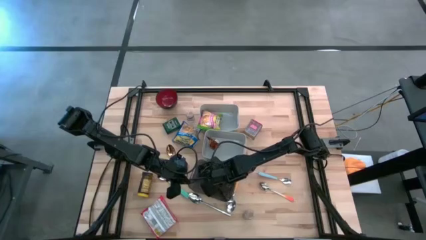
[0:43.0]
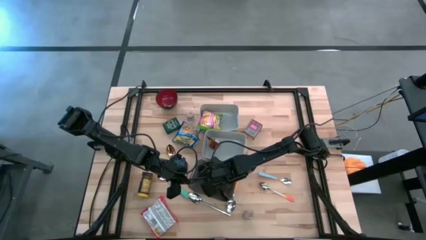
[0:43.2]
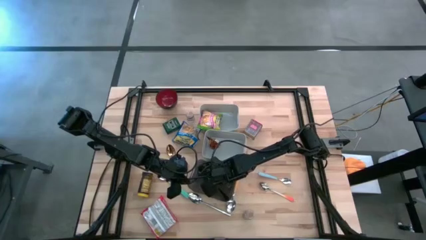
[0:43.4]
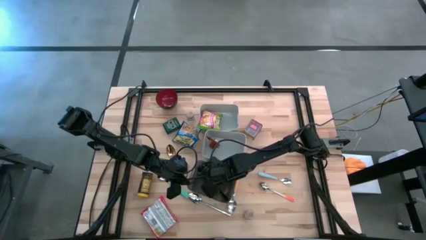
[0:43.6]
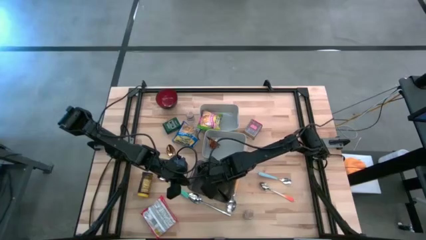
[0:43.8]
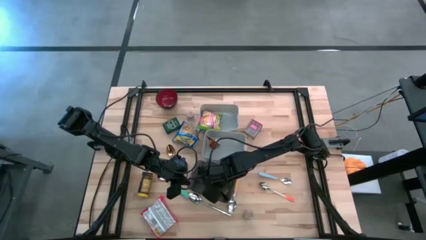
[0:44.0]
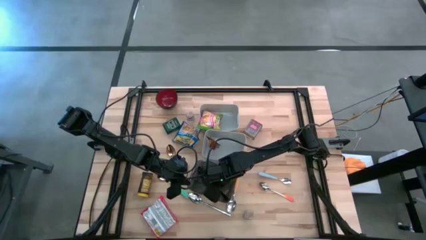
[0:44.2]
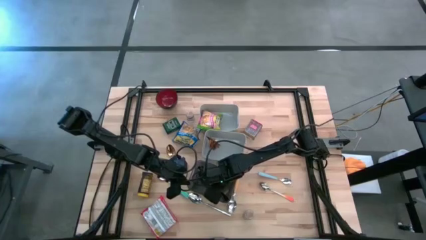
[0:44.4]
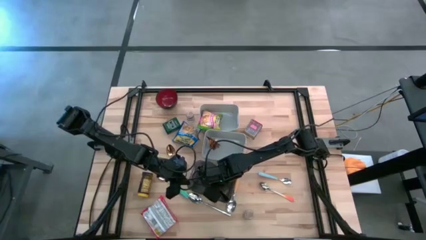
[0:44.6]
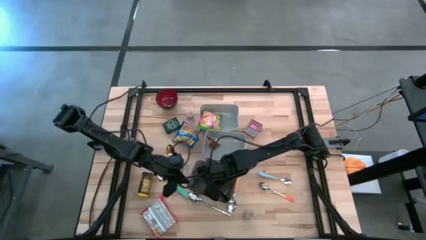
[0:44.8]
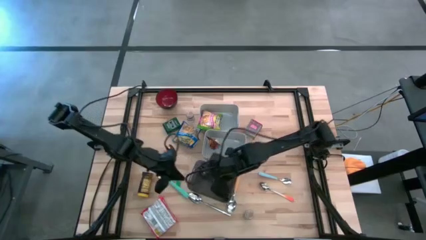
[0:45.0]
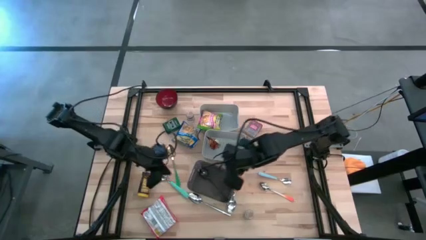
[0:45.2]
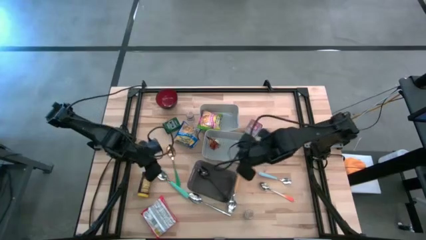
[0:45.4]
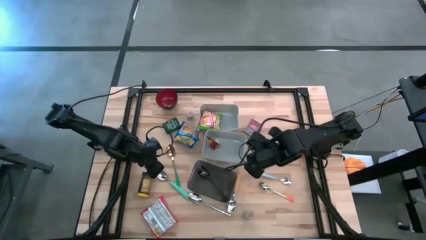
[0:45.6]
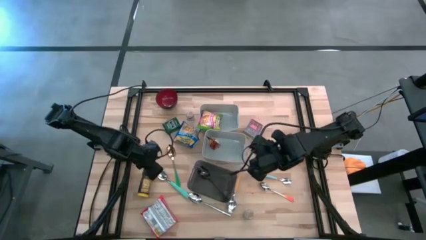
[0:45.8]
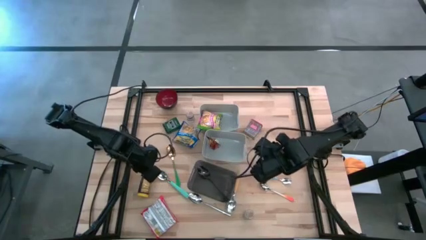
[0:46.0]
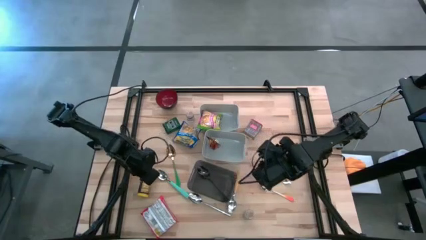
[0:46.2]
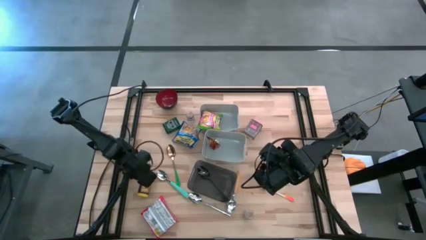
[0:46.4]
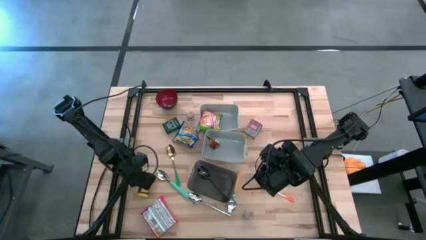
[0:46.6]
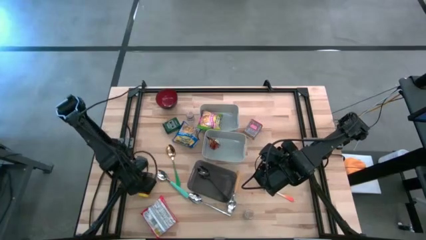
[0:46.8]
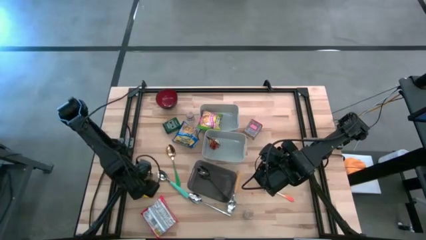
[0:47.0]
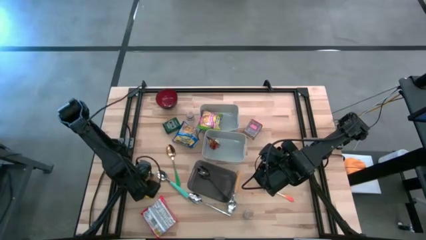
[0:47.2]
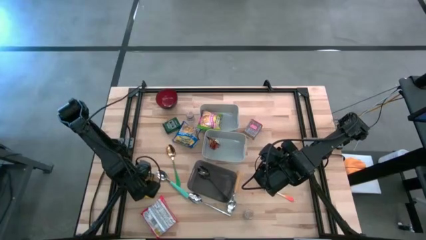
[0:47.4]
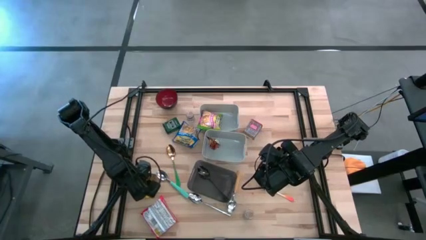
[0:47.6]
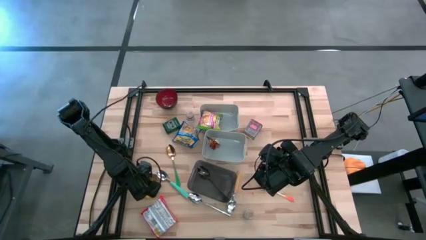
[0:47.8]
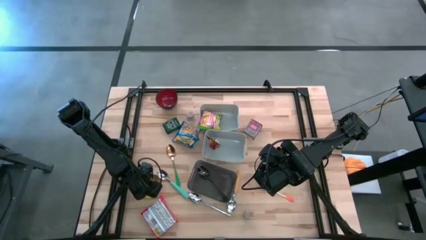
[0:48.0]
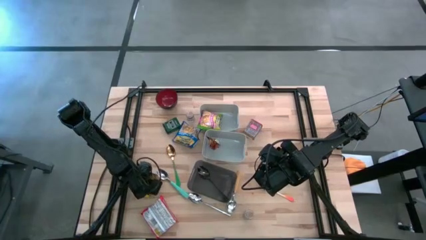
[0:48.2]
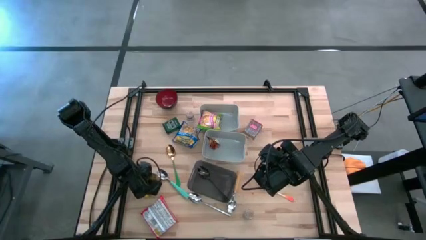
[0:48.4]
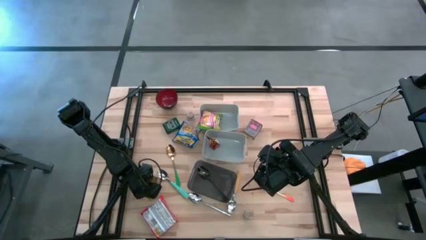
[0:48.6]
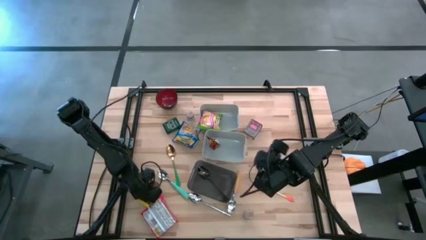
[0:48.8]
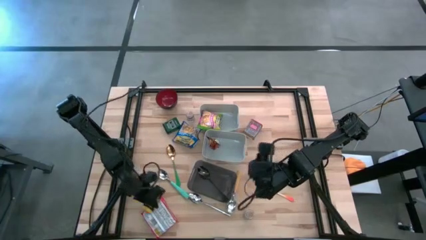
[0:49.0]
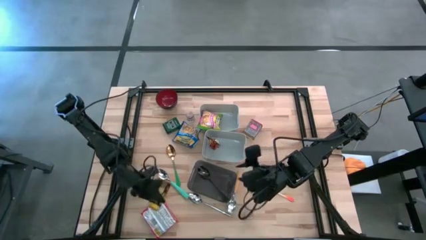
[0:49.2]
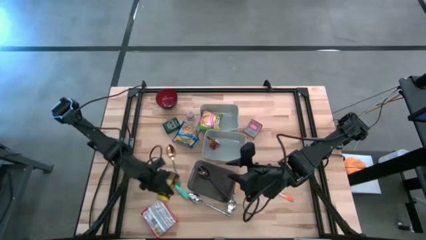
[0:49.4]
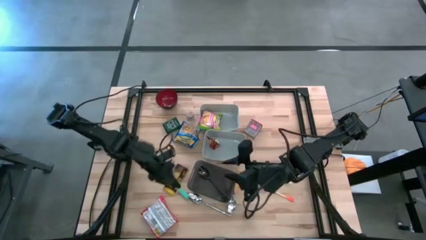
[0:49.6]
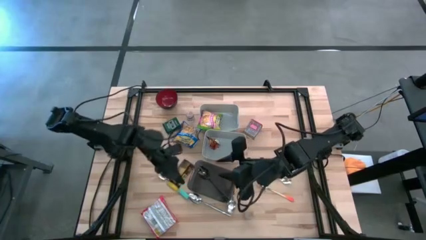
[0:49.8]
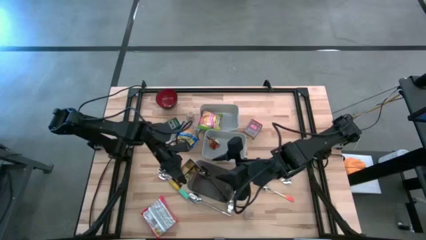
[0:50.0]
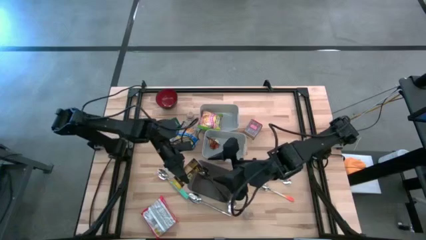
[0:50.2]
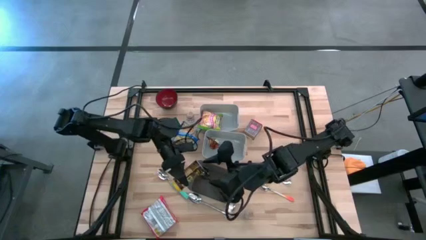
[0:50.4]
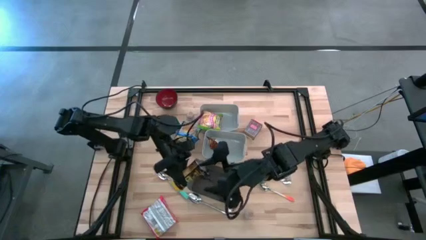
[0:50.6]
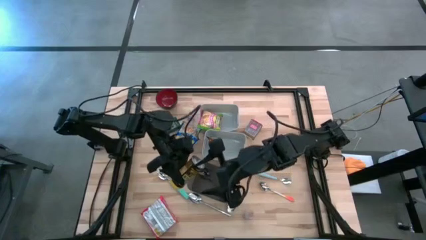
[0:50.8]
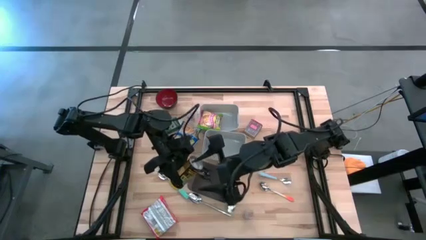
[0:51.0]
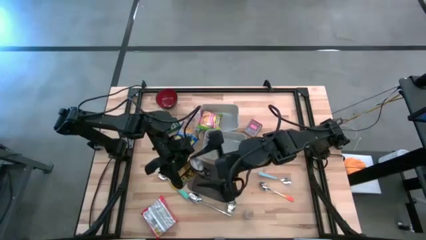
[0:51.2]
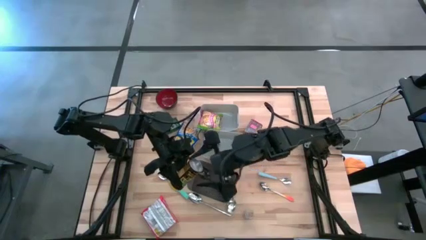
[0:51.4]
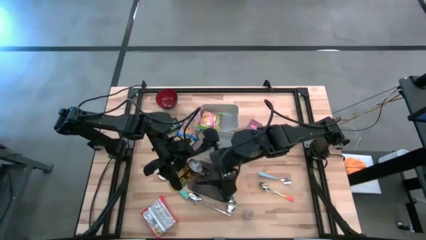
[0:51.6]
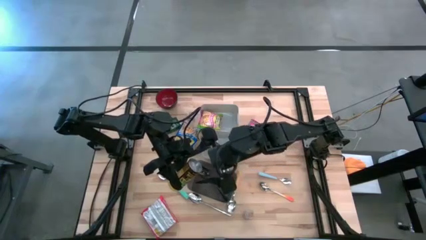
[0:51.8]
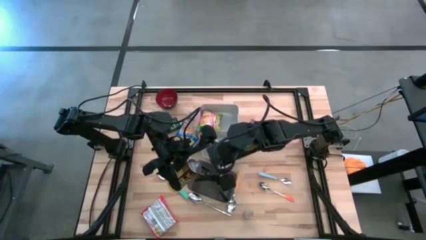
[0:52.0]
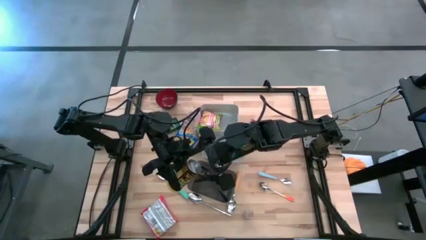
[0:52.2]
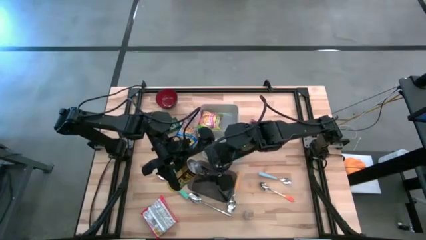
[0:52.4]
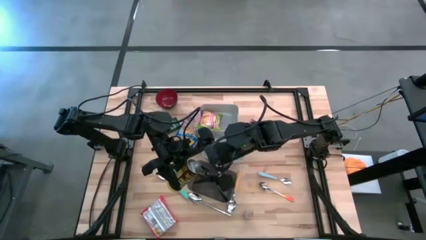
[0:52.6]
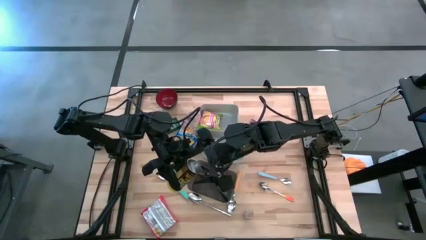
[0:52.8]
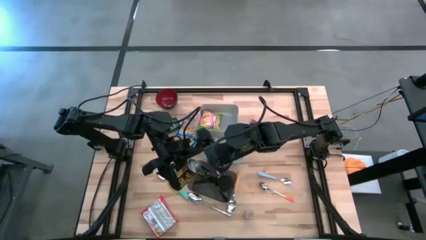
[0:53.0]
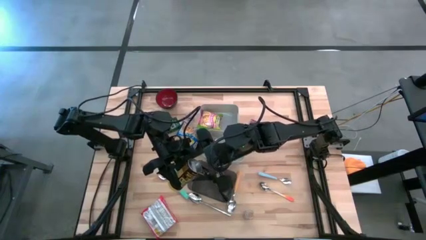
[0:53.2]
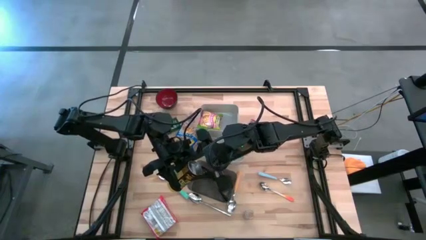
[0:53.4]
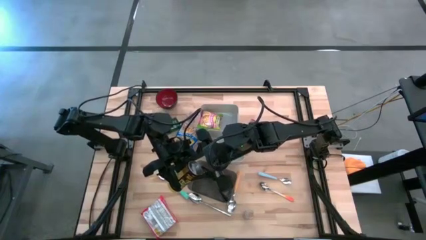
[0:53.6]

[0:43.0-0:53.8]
Put the yellow seasoning bottle into the bottom gray bin
